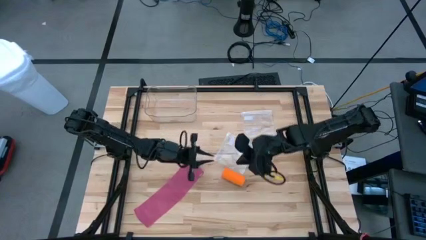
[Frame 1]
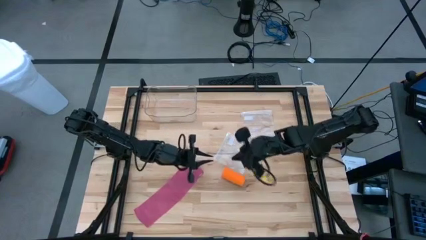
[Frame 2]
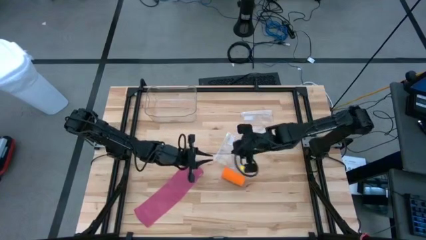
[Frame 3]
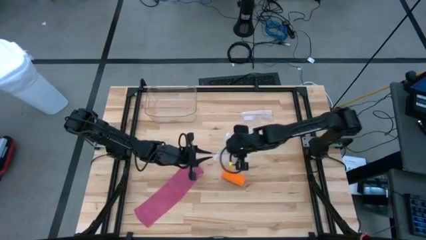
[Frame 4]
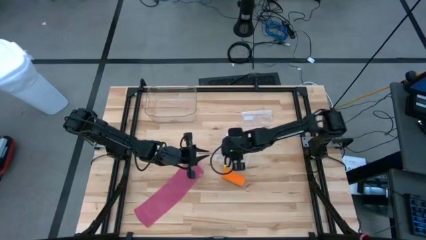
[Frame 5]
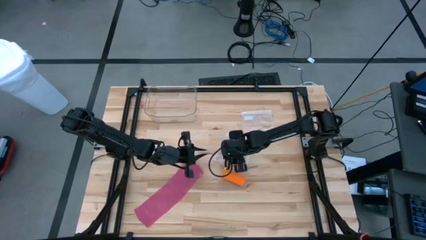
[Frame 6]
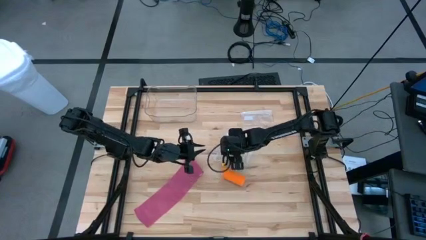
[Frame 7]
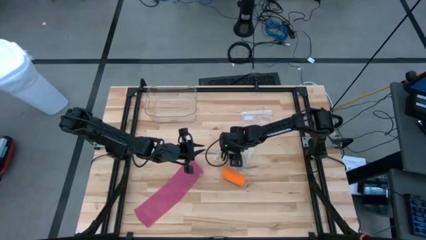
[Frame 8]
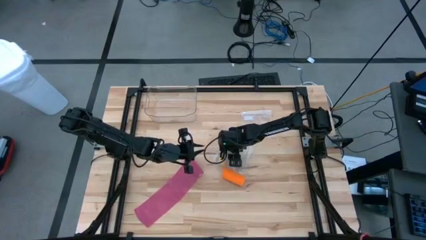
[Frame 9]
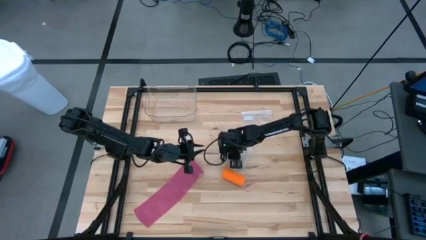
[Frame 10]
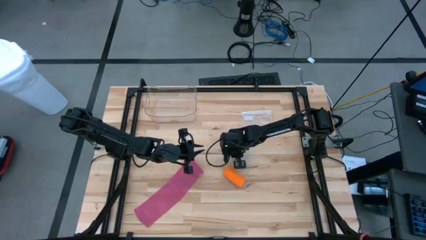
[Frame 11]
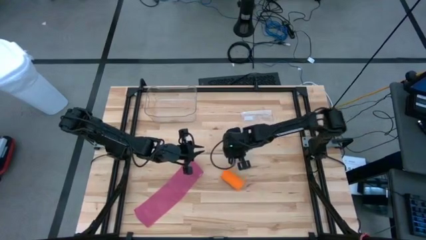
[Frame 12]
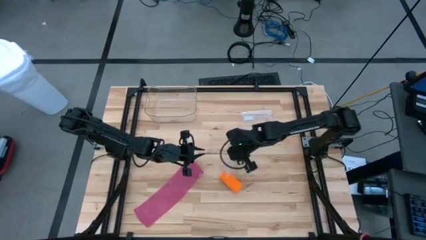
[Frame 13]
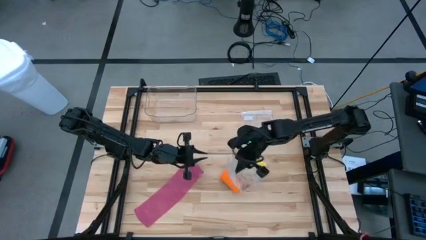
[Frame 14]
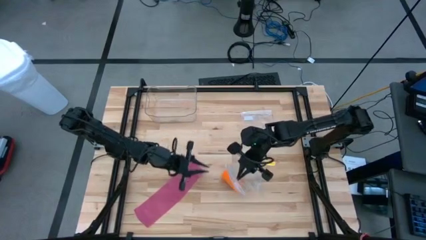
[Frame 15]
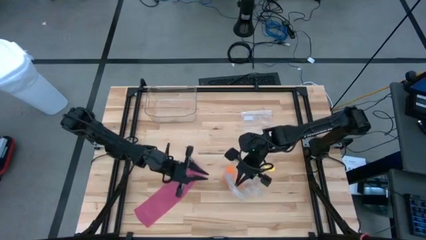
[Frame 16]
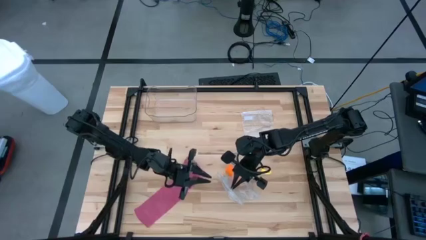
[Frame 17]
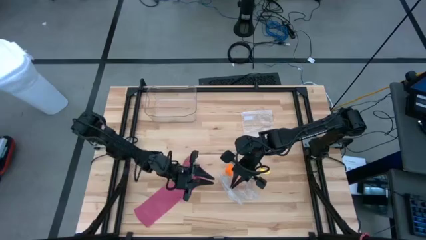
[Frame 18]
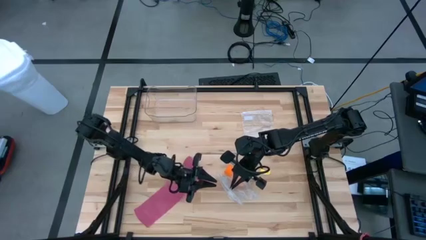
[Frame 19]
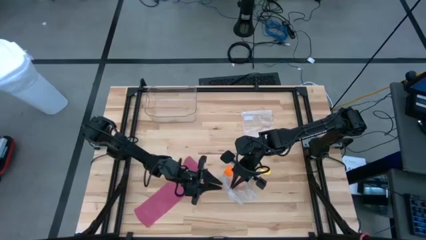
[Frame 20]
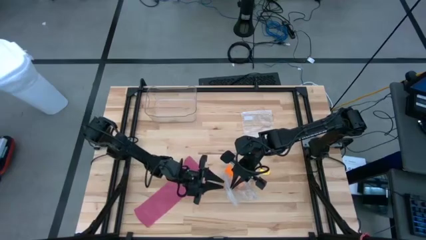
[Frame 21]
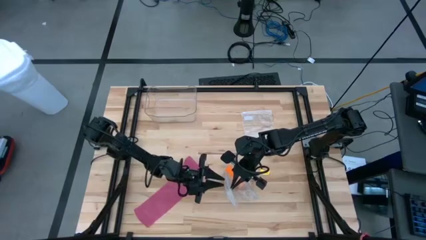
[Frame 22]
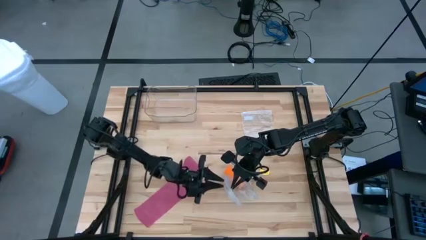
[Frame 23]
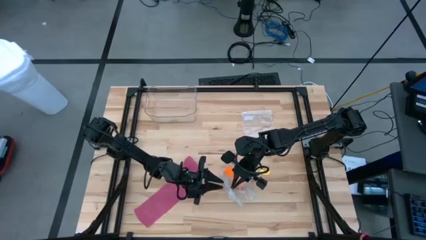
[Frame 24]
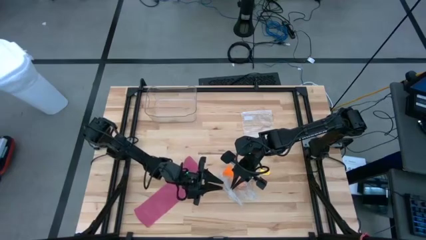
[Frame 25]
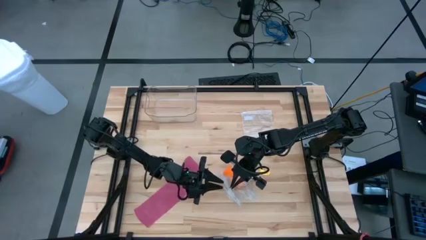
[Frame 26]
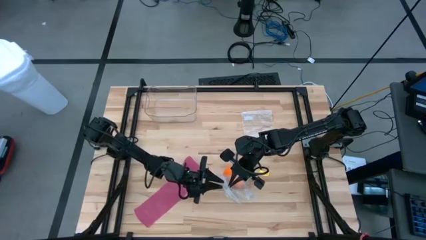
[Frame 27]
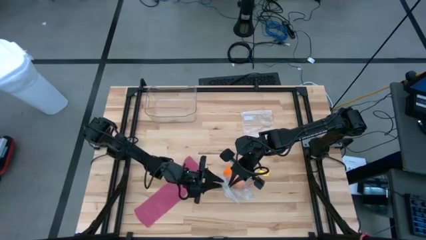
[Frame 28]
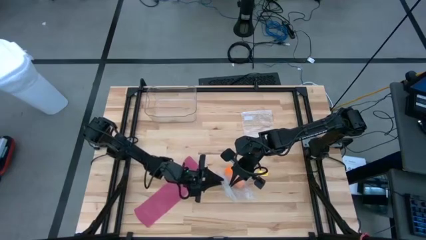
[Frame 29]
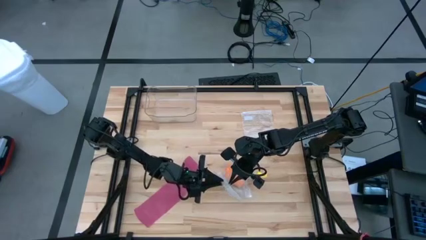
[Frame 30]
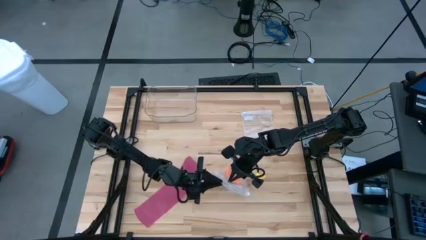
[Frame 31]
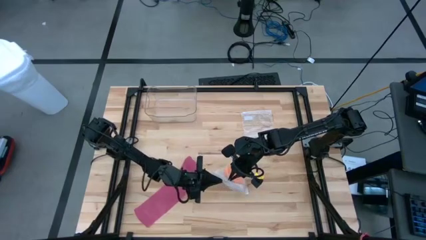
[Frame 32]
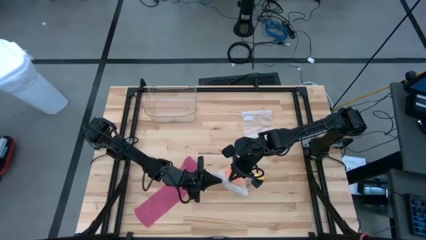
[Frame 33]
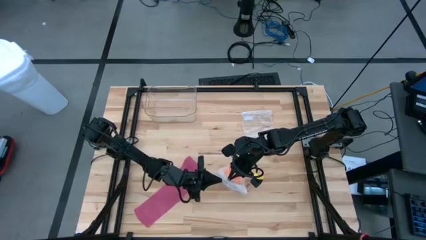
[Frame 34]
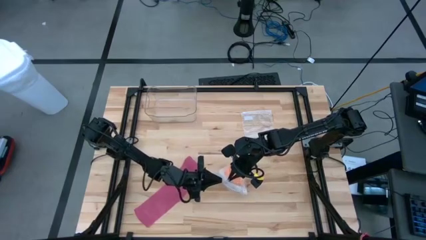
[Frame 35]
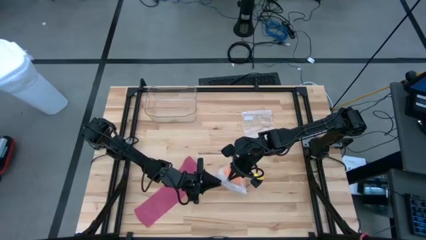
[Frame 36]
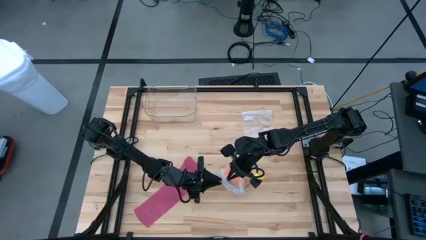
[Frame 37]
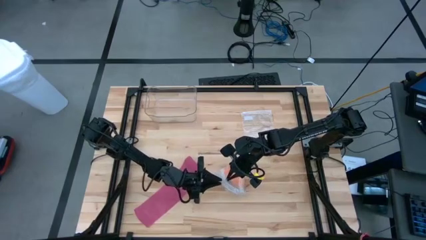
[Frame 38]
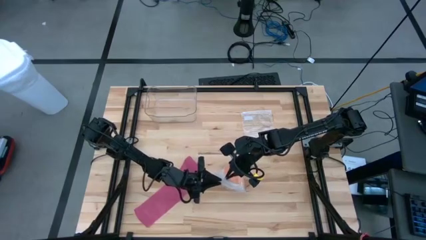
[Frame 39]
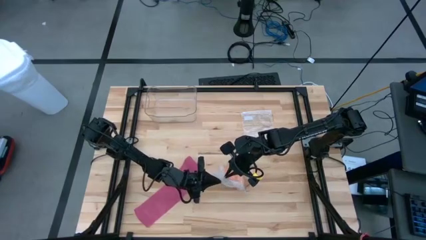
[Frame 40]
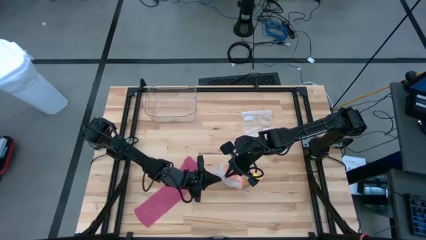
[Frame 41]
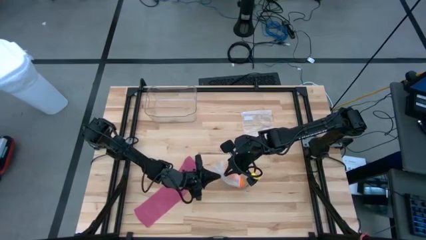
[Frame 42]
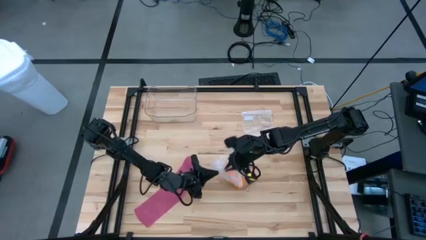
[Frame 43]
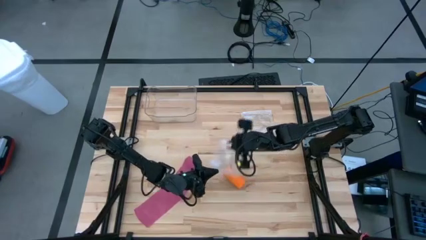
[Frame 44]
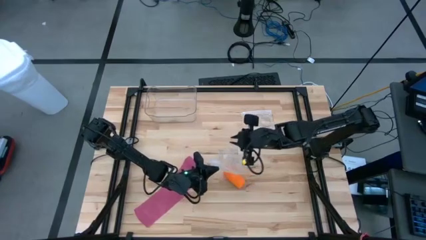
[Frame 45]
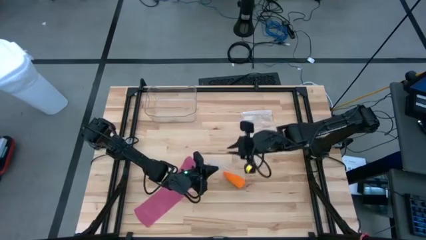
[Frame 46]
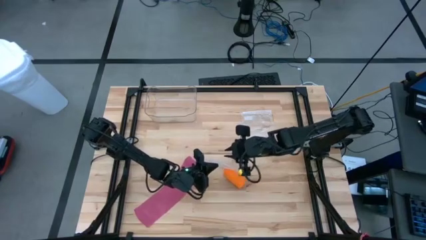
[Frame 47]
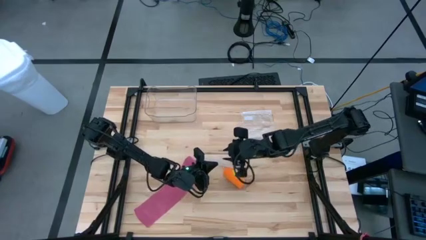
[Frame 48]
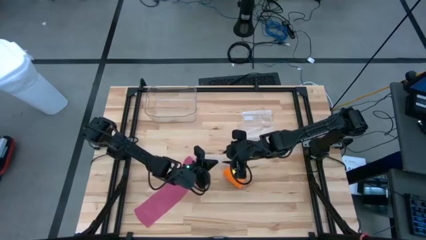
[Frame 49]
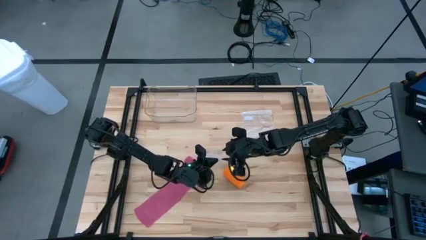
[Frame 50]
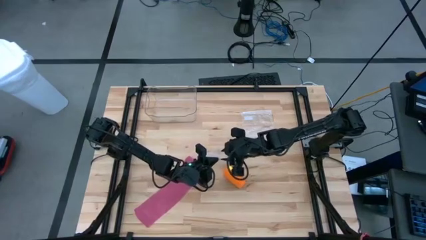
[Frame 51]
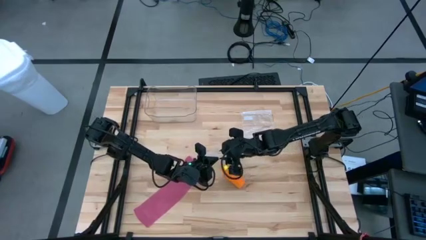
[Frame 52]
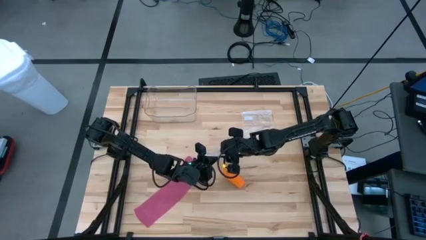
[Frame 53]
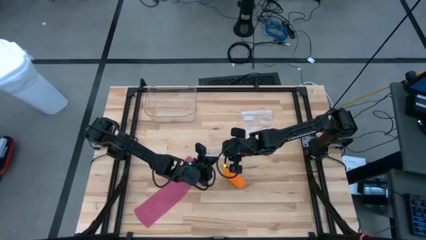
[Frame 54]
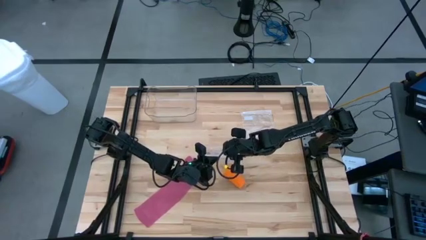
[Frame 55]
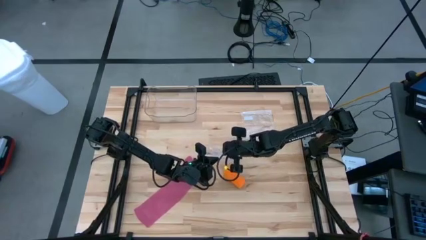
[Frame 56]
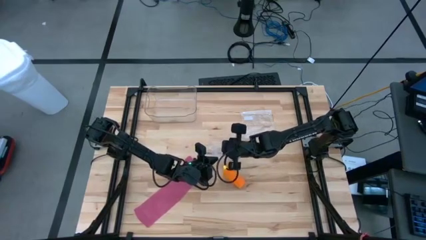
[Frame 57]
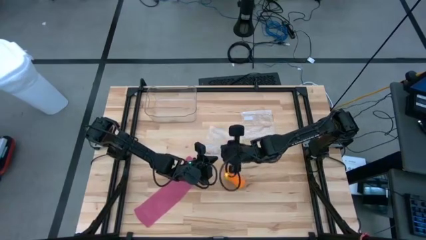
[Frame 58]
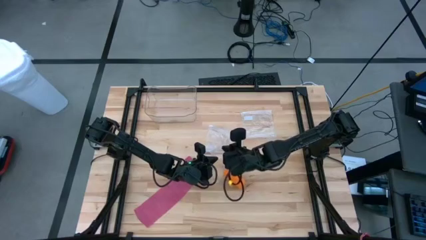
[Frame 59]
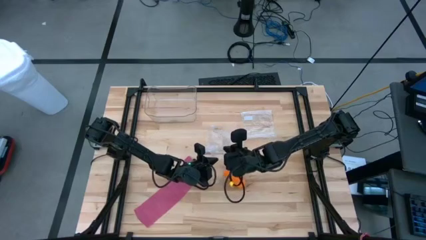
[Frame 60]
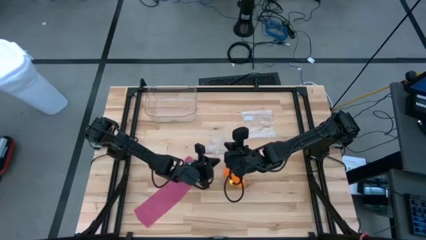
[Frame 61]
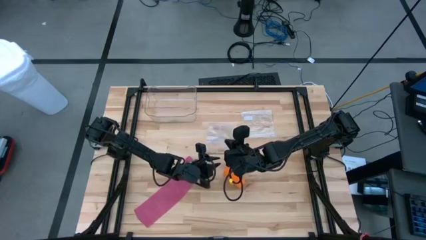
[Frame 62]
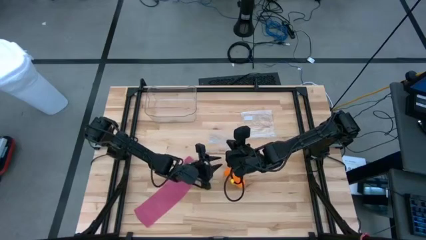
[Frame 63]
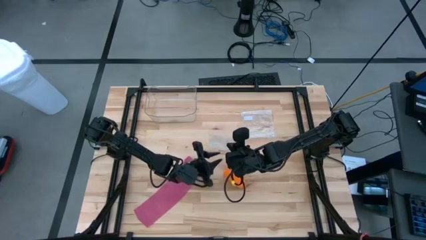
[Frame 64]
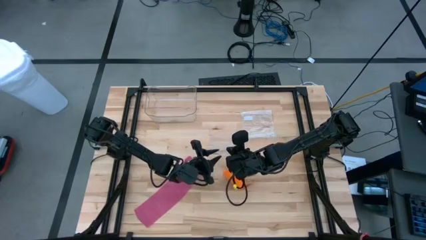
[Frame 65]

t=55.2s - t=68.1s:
Task: Roll bandage
Put the rolled orange bandage into the transparent zip bag
